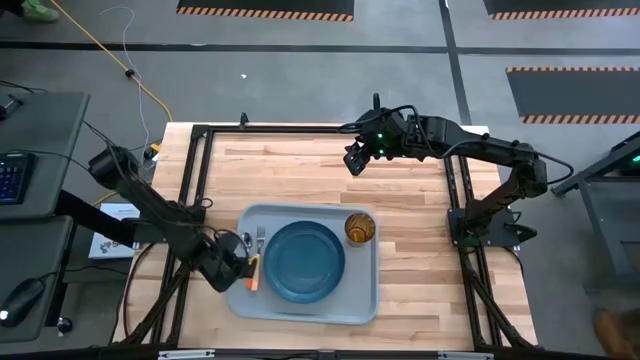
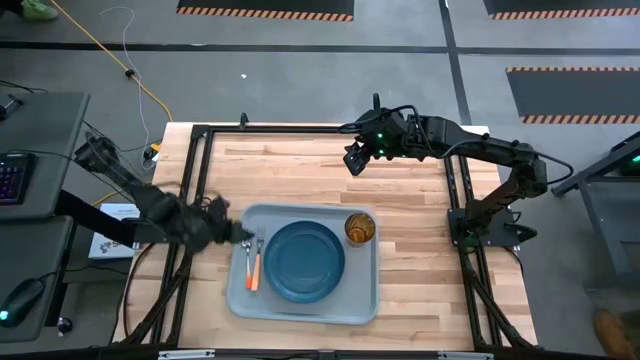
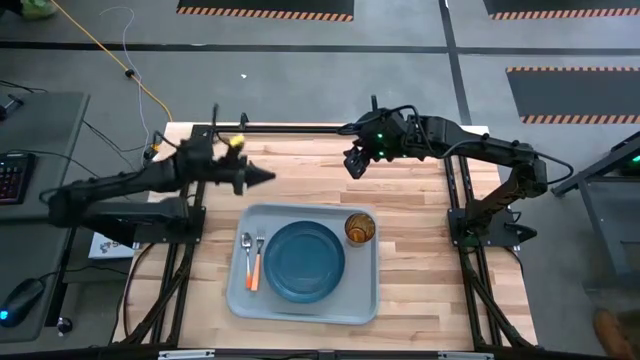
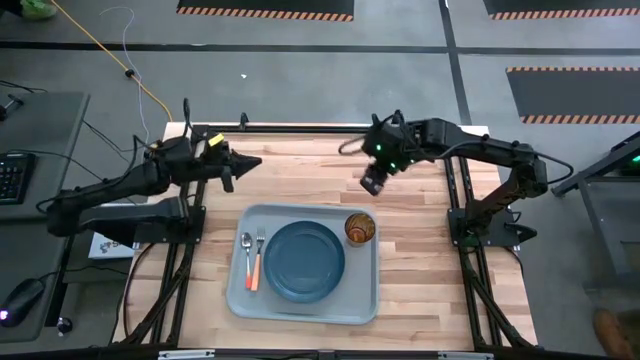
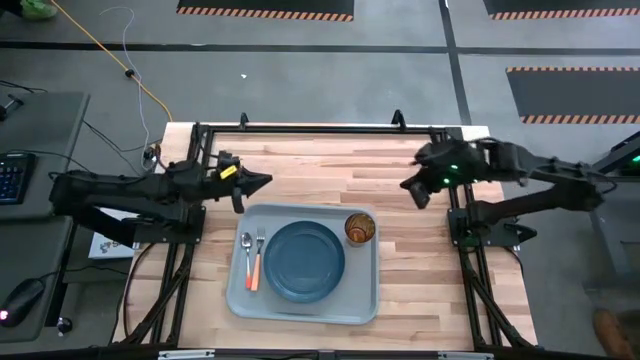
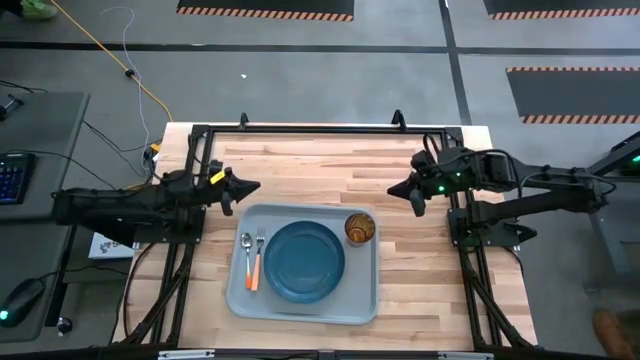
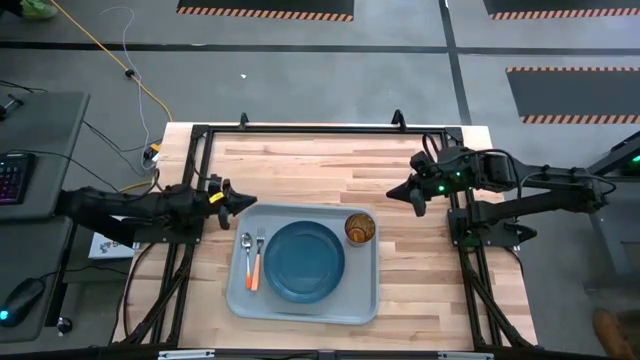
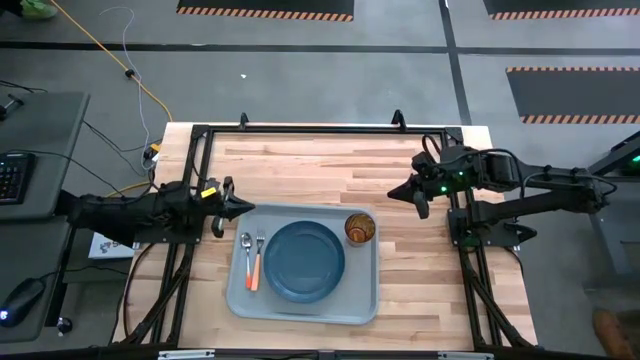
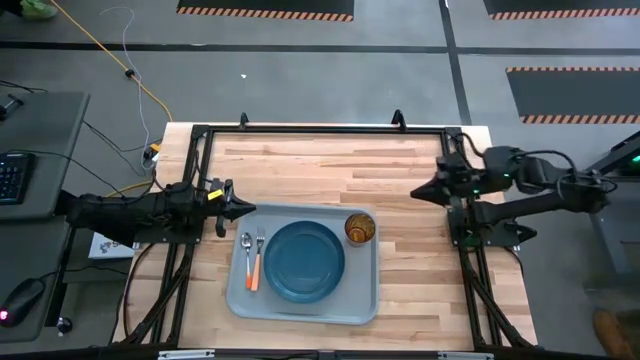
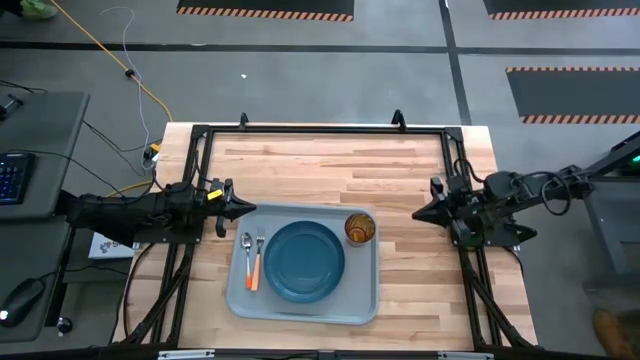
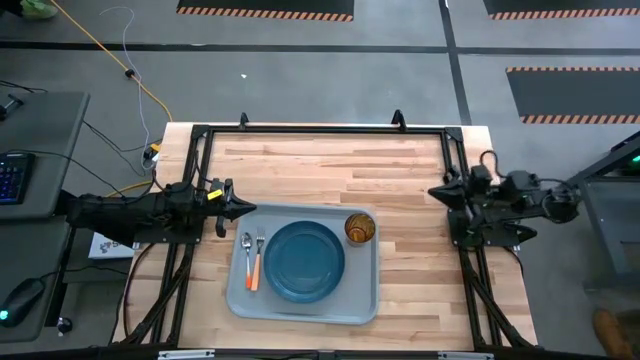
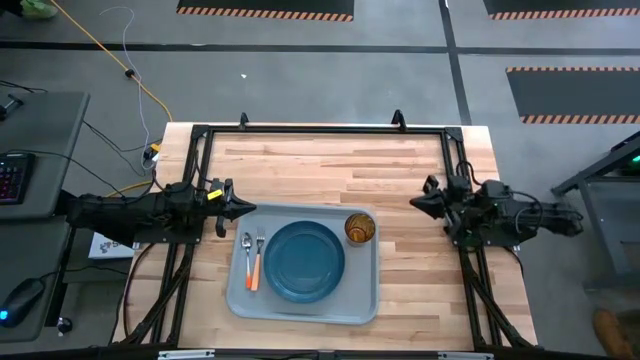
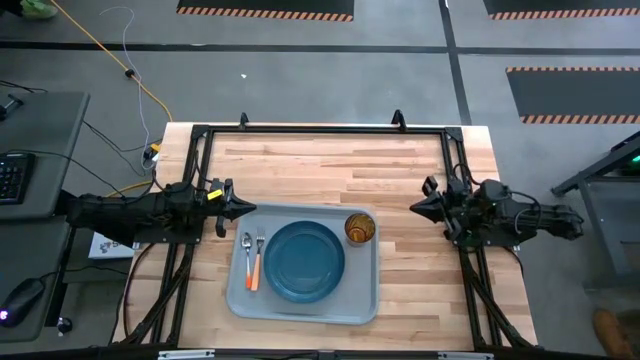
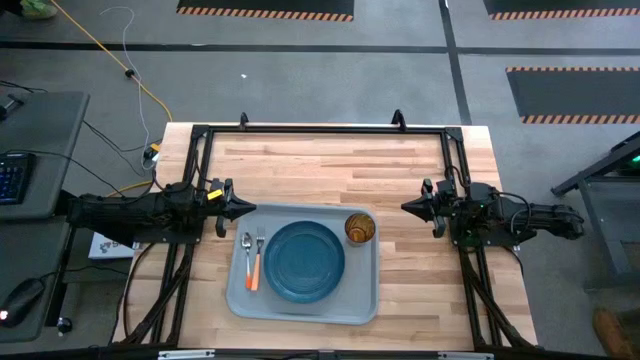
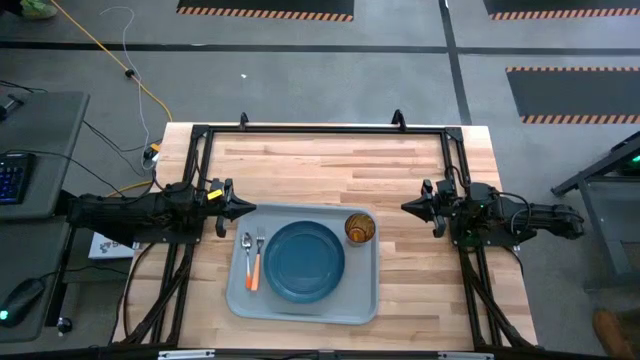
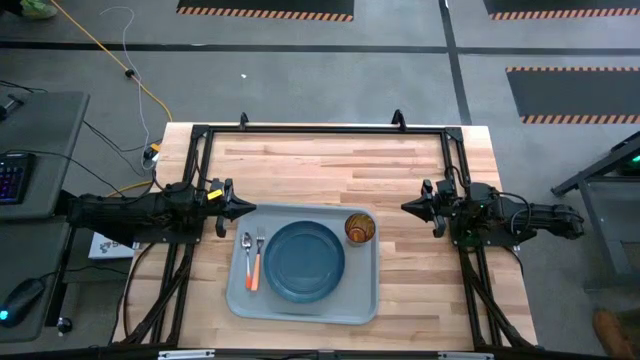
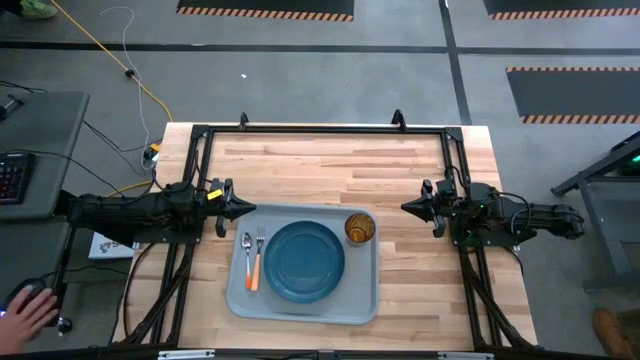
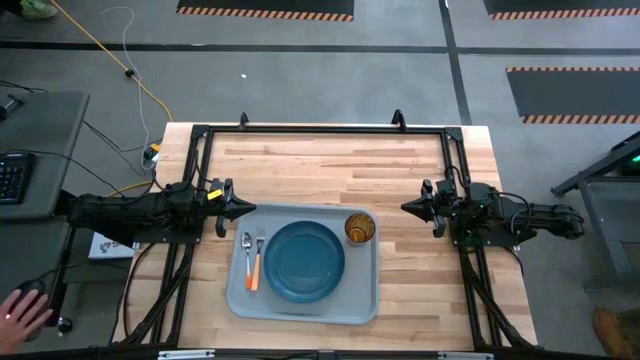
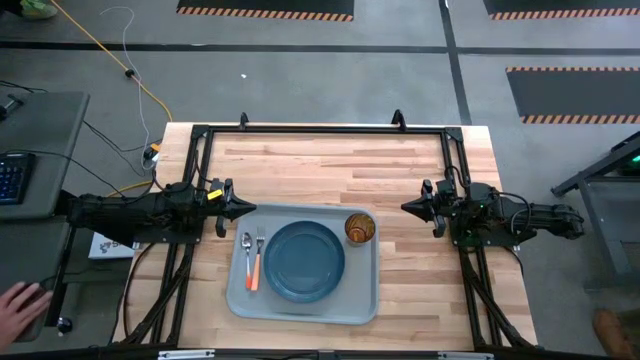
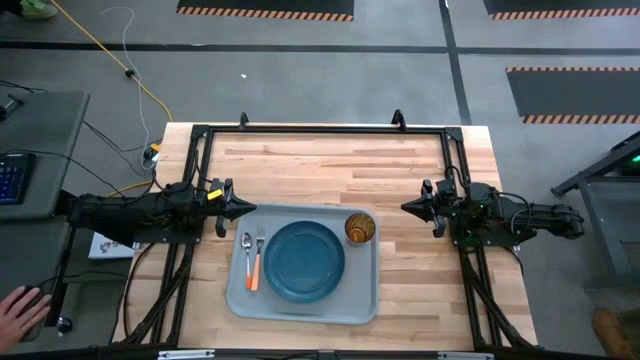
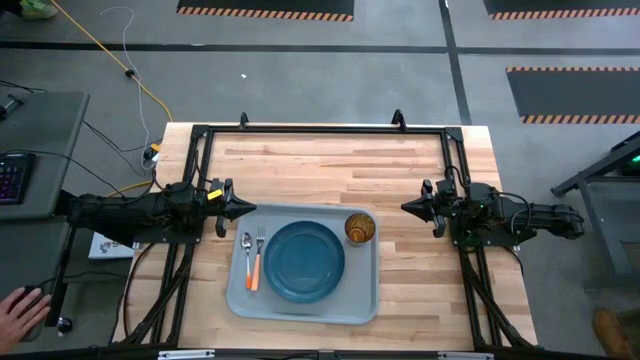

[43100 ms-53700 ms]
Task: Pick and place plate/cup/fork/spoon on tray
Return to Home Position

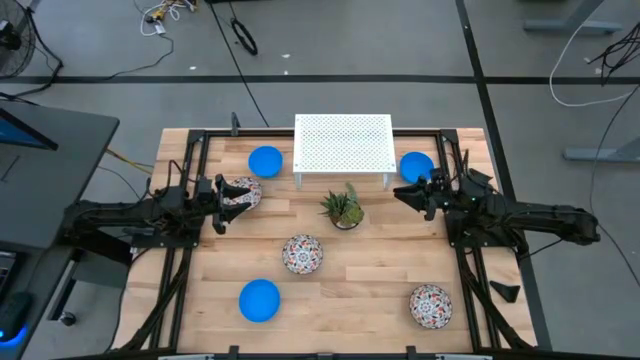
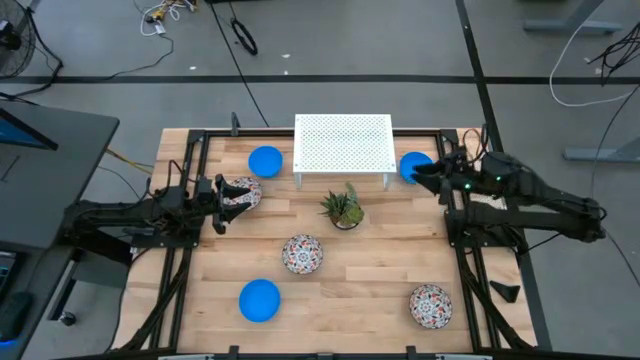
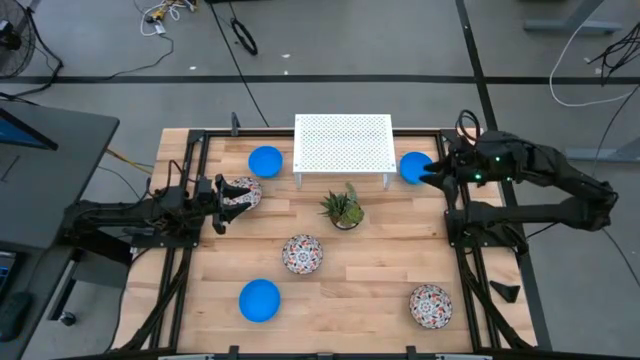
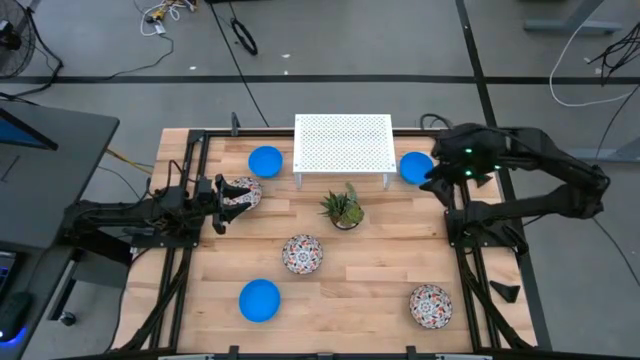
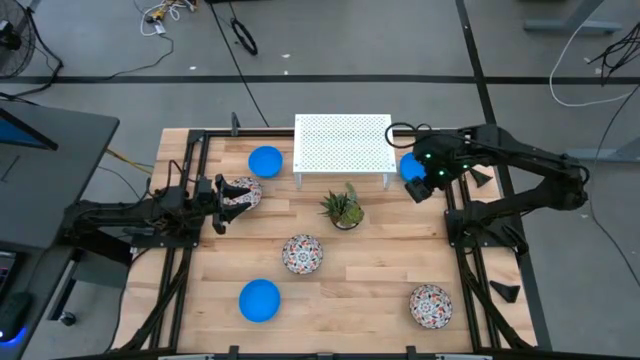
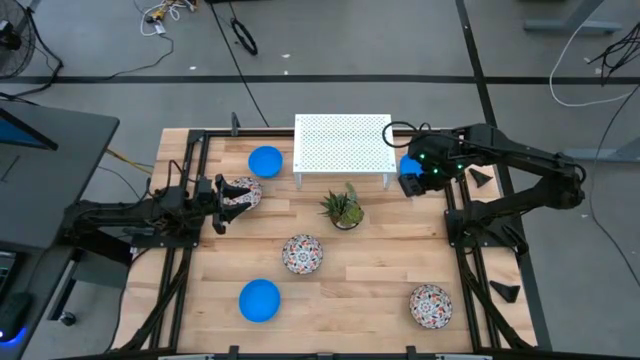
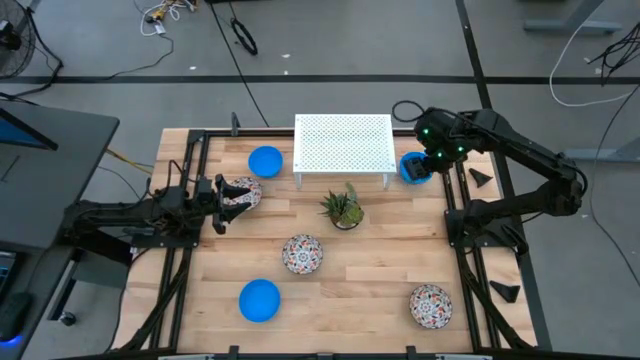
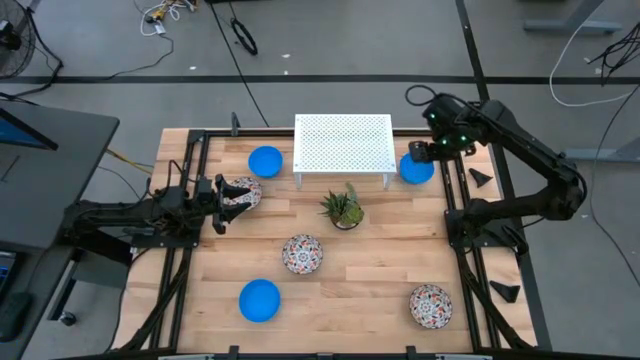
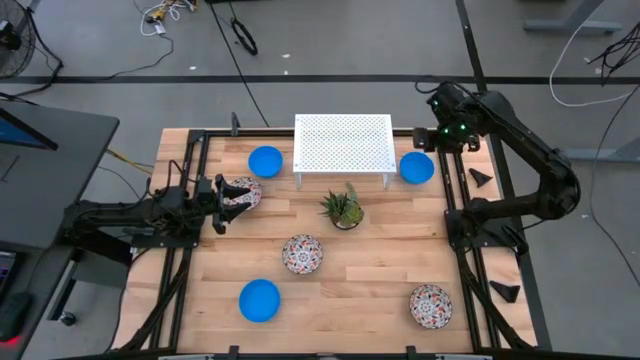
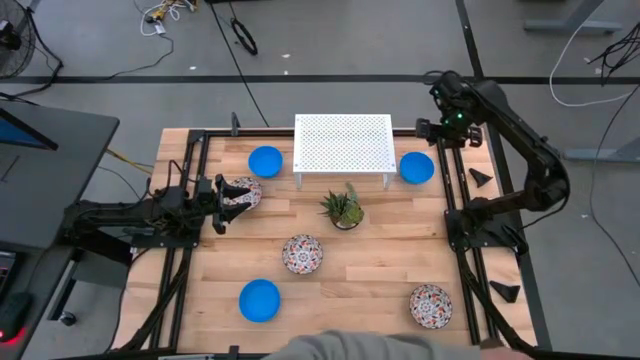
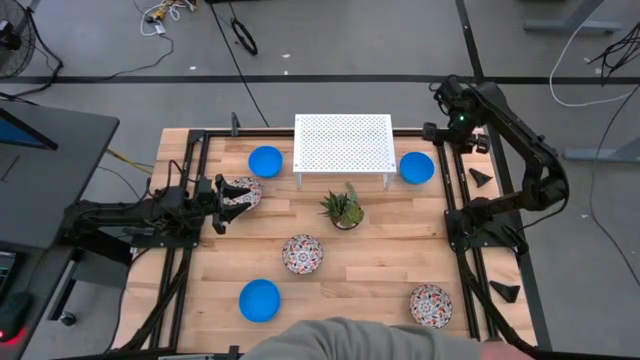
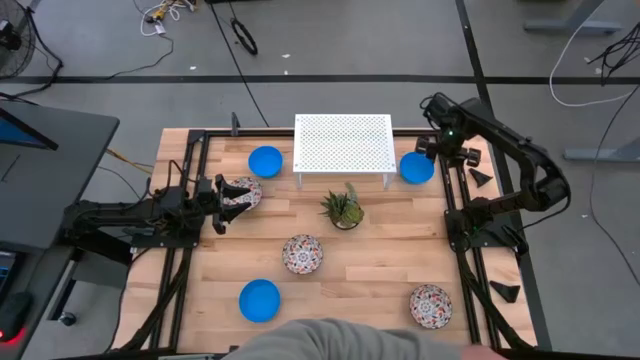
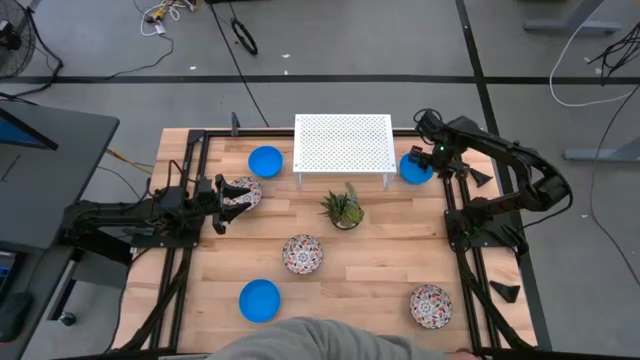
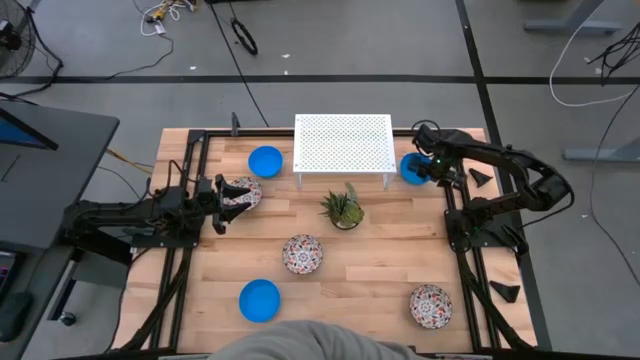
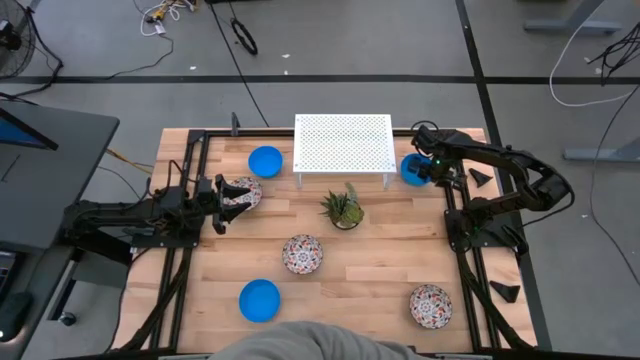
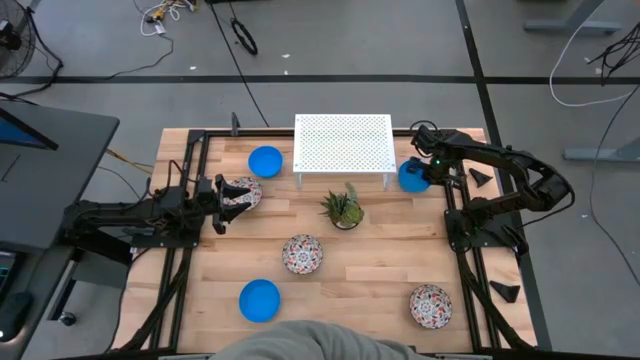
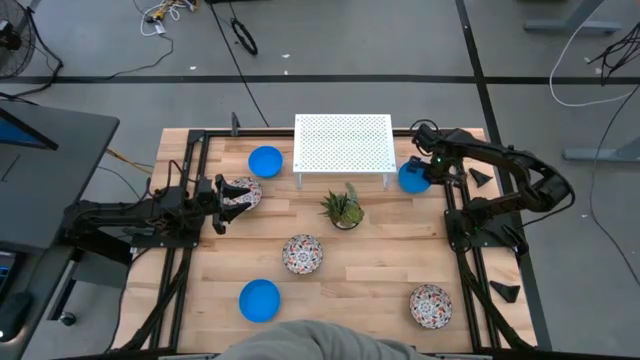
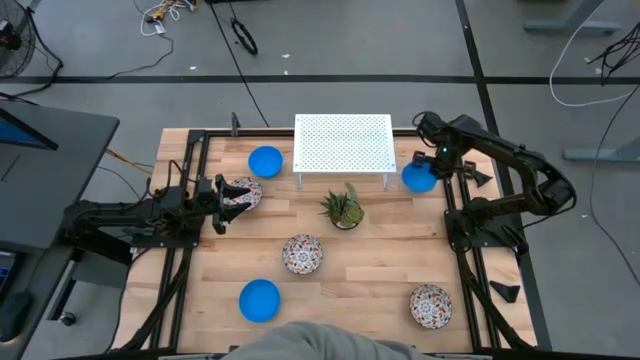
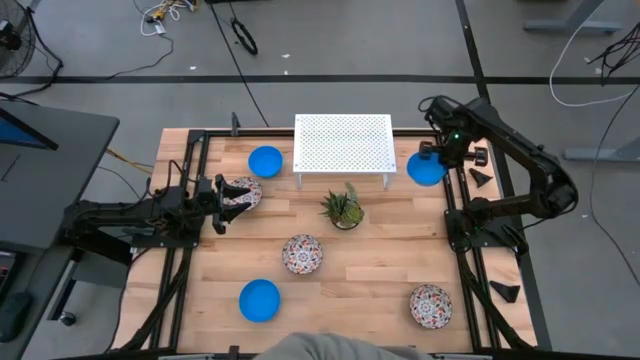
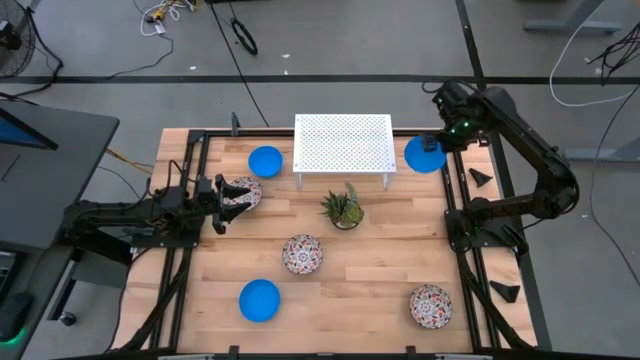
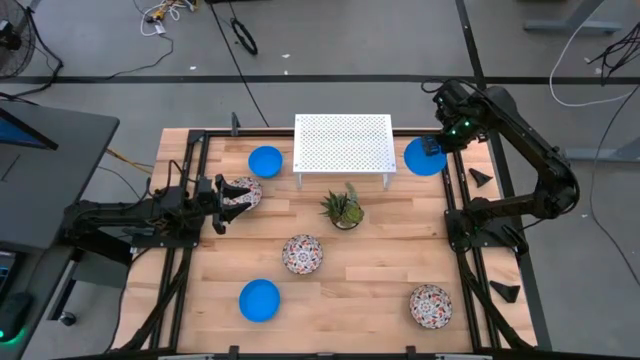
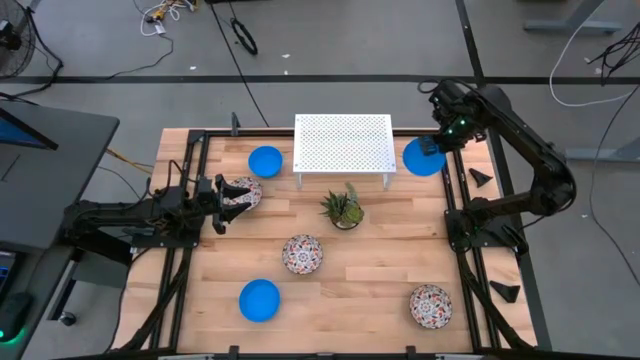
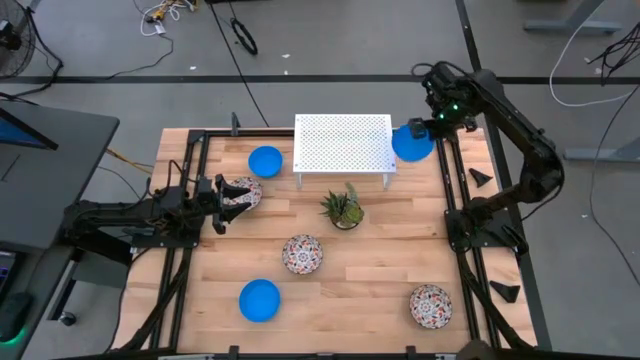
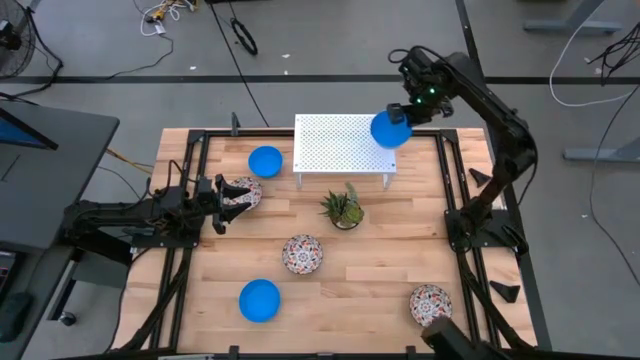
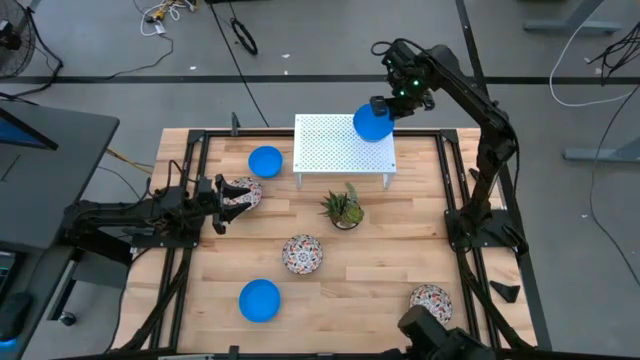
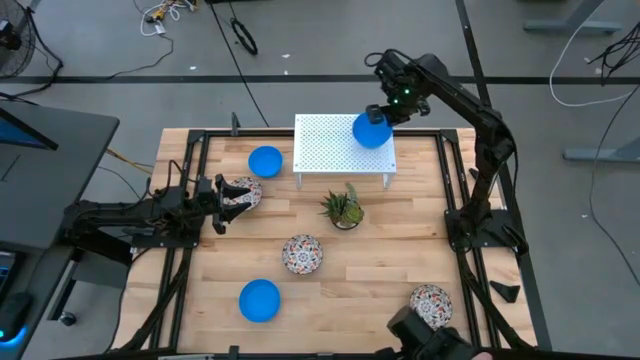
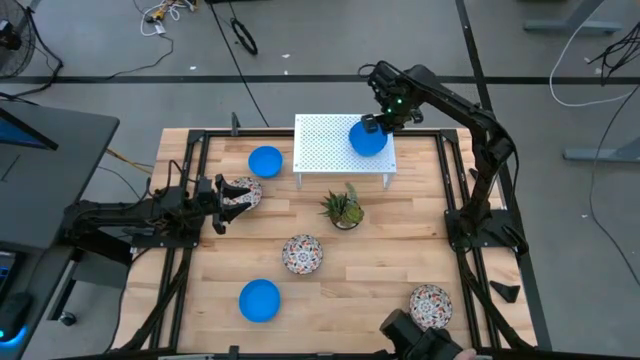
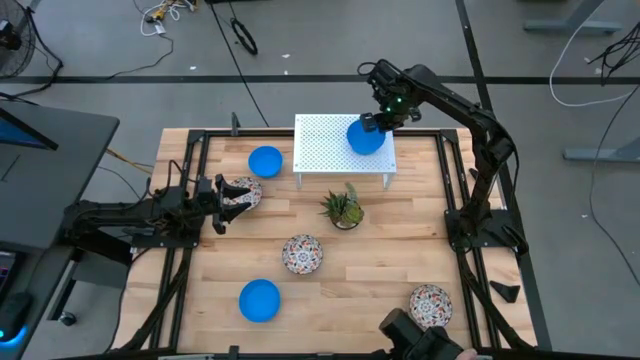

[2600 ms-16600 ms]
Task: Pick & Place Mini bowls
Put the top right blue bowl on the shelf
